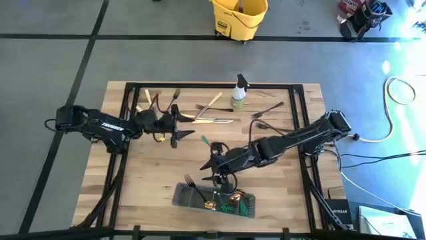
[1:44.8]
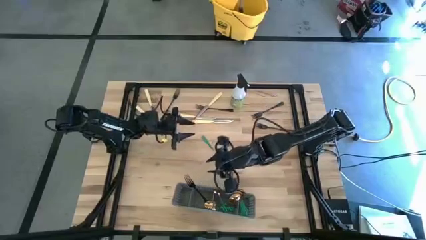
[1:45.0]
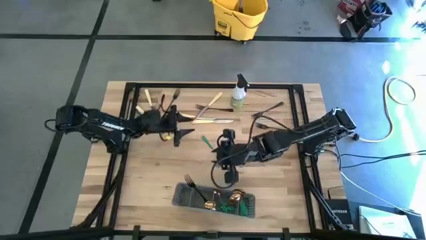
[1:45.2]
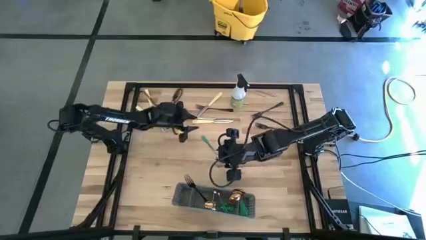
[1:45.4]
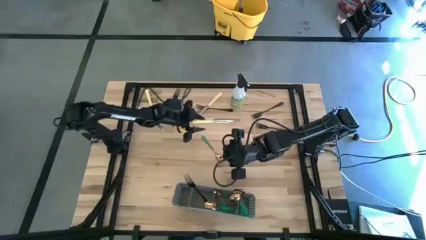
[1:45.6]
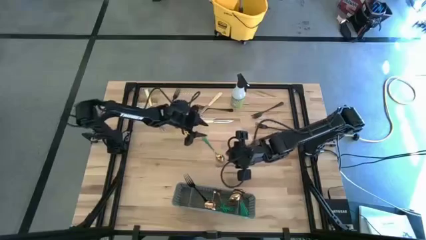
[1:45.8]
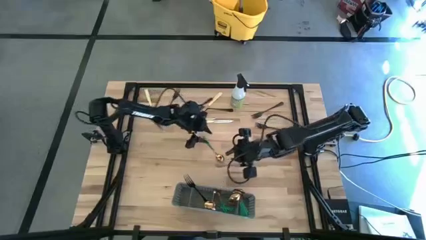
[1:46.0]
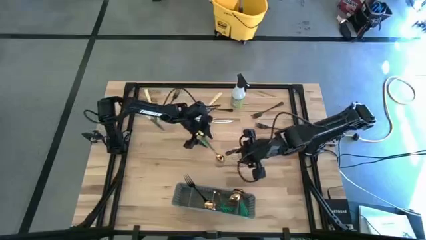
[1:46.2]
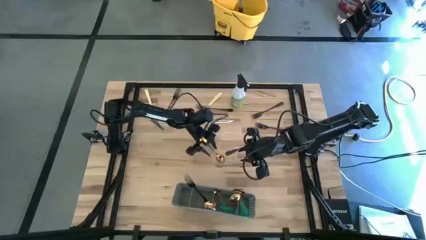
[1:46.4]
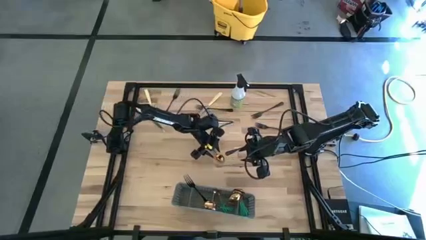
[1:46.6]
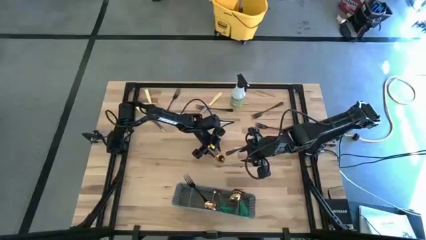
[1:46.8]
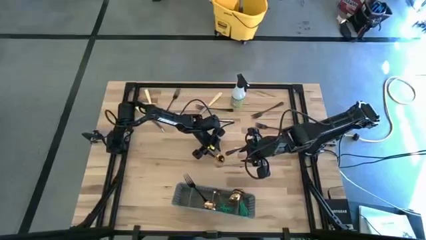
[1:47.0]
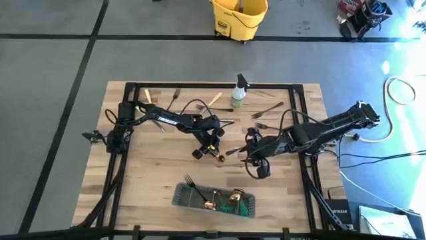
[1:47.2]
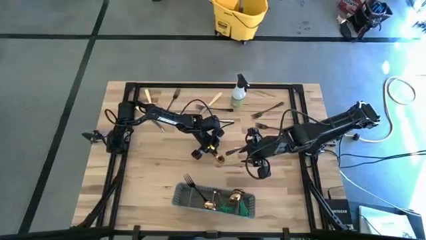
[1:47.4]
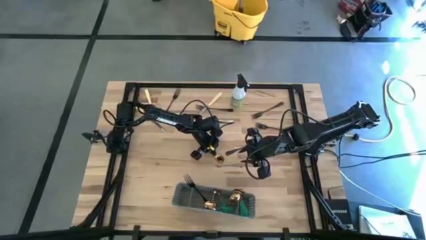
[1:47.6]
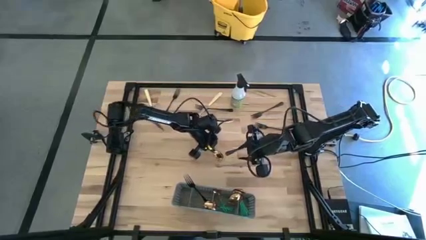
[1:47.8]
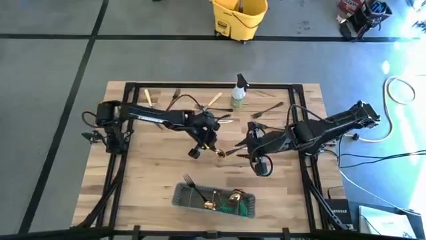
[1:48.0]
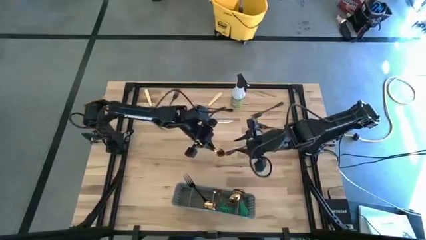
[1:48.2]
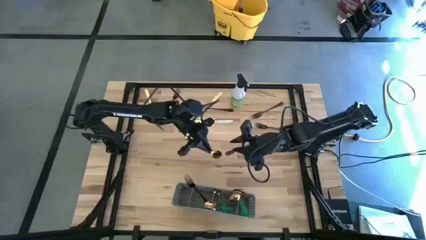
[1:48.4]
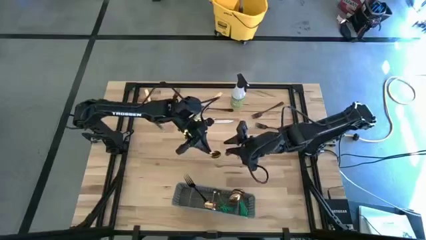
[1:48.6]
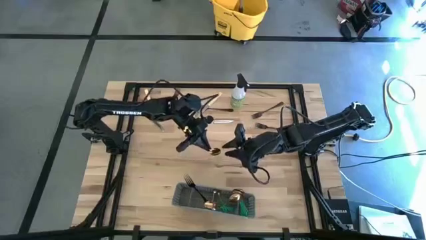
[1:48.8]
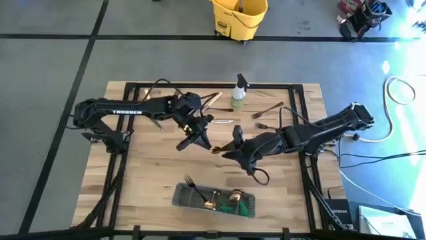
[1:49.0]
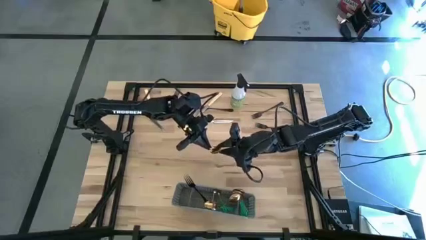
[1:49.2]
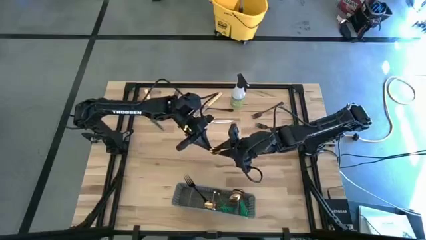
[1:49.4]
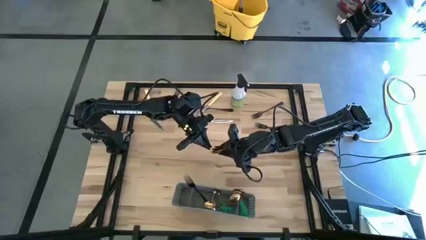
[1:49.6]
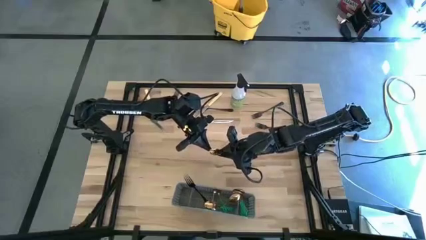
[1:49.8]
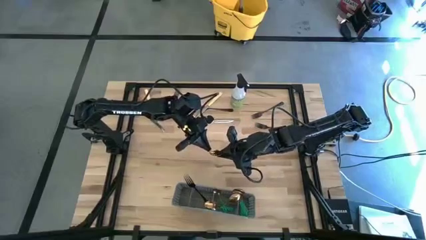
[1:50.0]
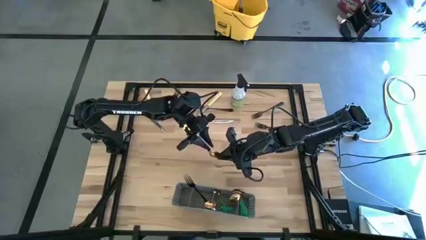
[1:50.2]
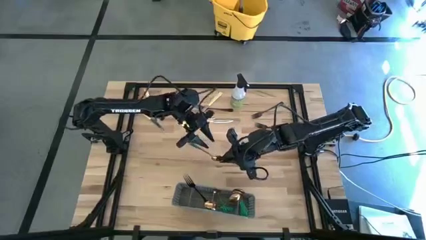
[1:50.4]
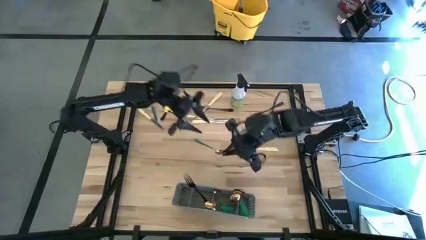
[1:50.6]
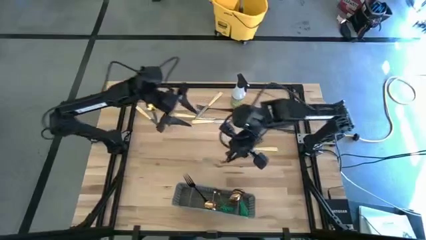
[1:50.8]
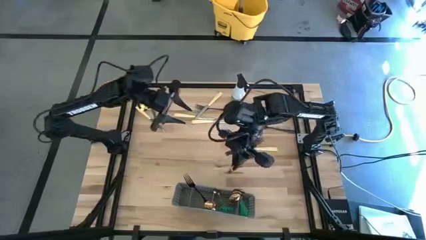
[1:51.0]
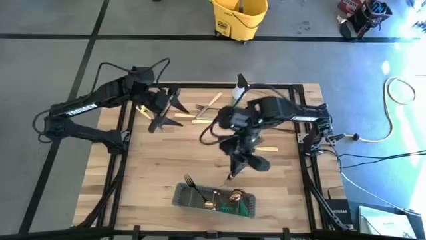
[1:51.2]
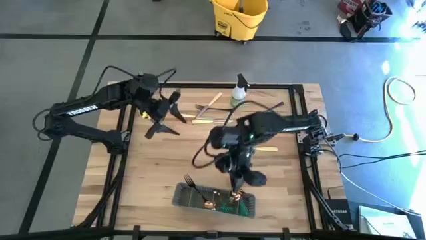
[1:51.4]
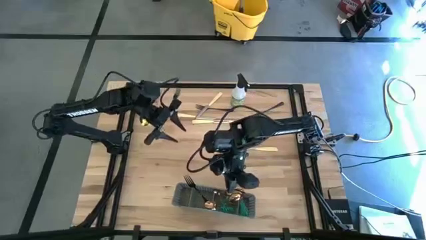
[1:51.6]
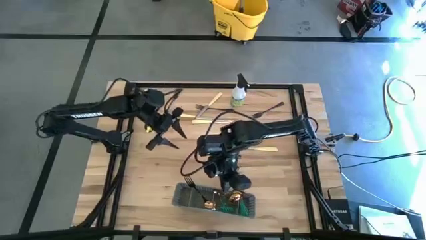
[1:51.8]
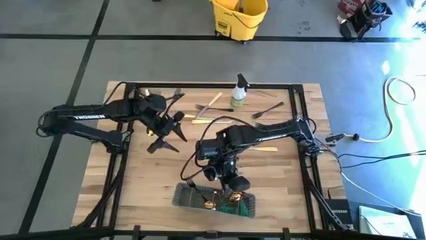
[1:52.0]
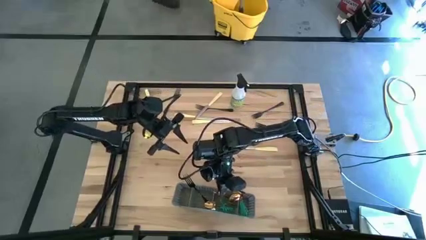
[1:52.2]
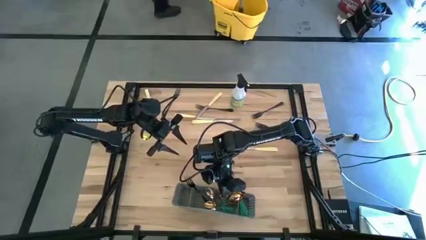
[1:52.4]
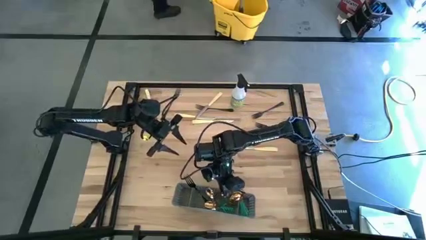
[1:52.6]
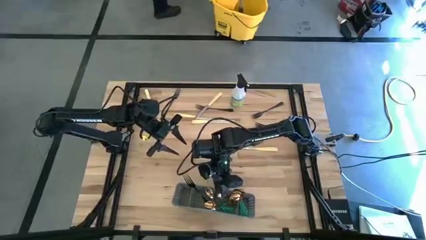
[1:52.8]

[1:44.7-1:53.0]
Task: Sort silverware
Put the green spoon into the gray cutlery rack

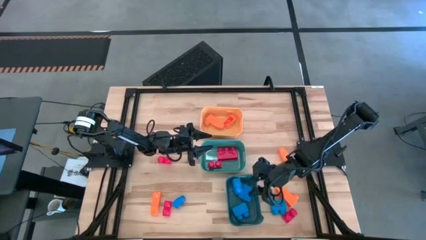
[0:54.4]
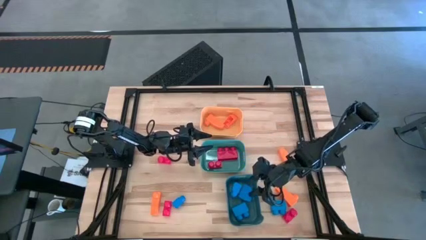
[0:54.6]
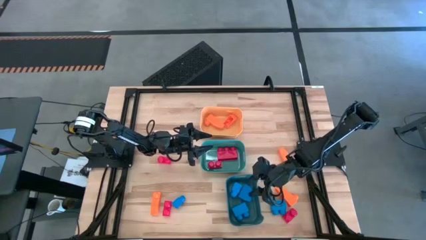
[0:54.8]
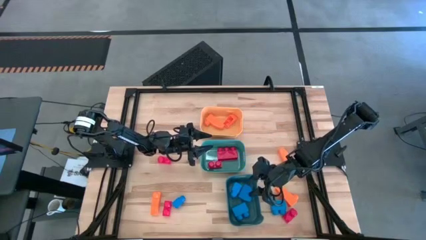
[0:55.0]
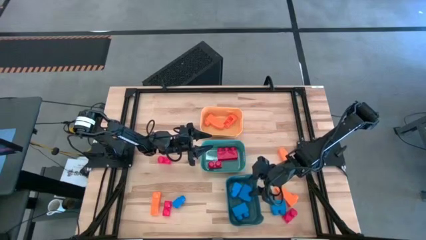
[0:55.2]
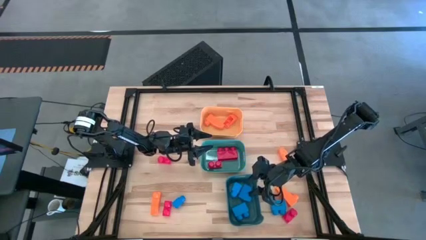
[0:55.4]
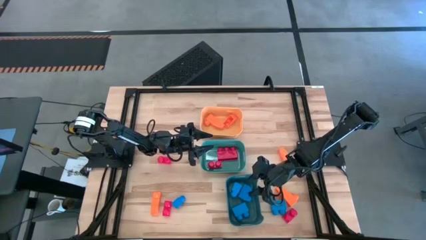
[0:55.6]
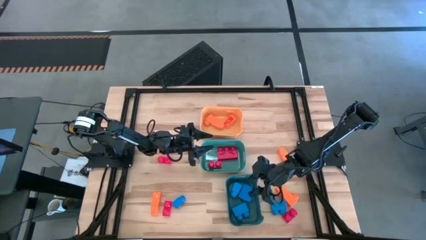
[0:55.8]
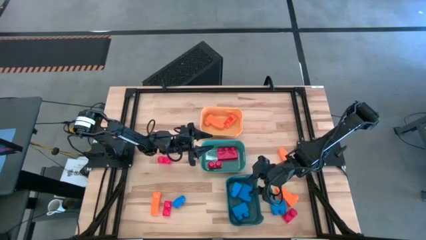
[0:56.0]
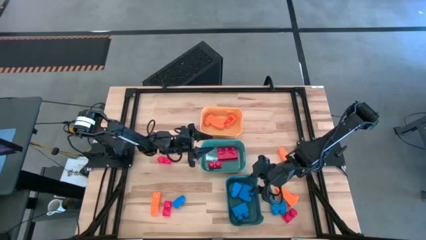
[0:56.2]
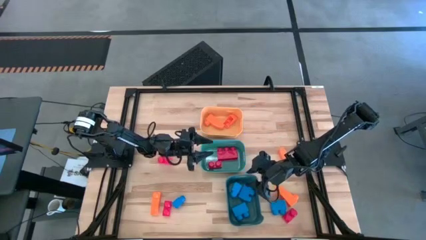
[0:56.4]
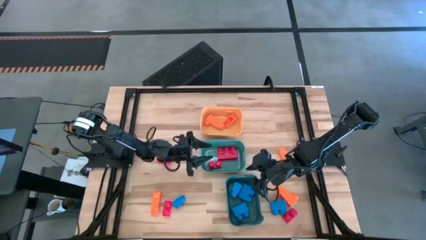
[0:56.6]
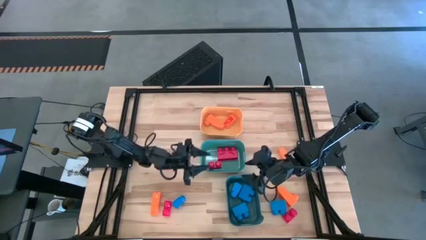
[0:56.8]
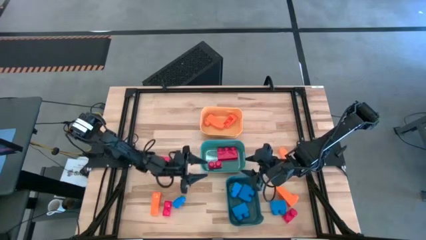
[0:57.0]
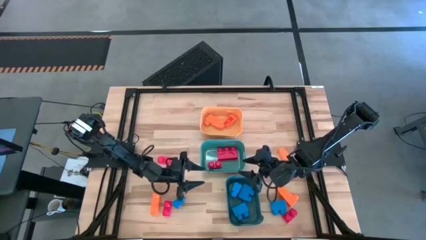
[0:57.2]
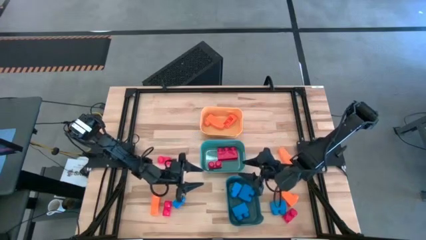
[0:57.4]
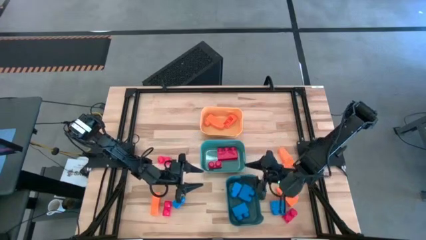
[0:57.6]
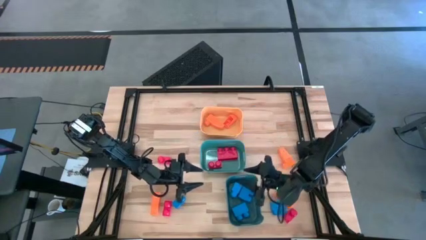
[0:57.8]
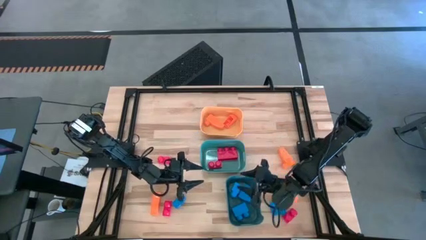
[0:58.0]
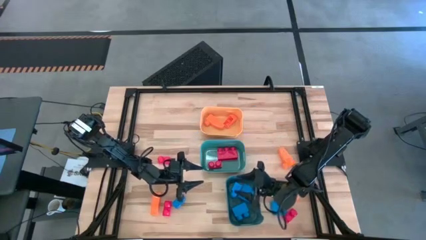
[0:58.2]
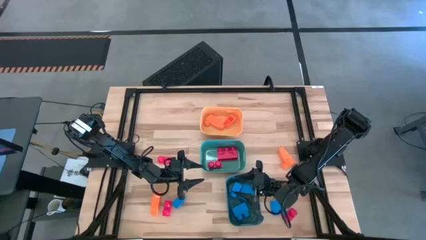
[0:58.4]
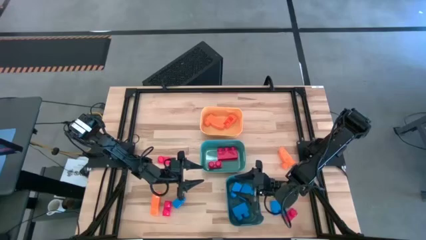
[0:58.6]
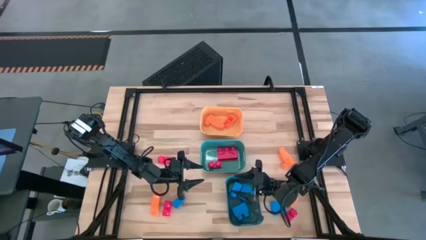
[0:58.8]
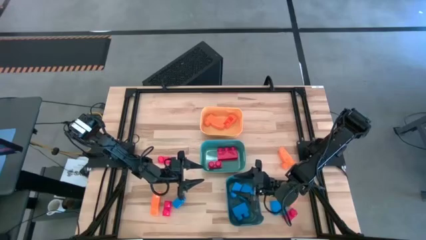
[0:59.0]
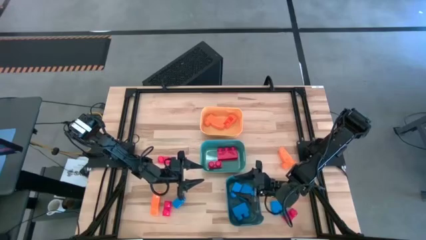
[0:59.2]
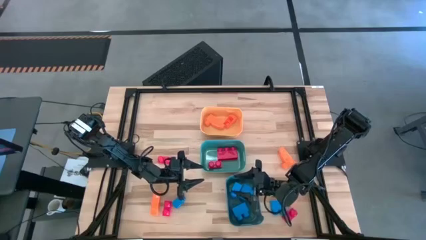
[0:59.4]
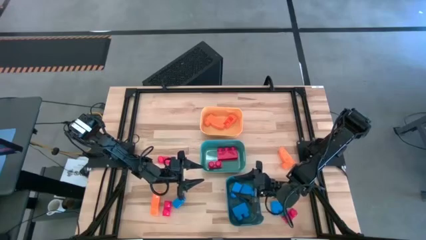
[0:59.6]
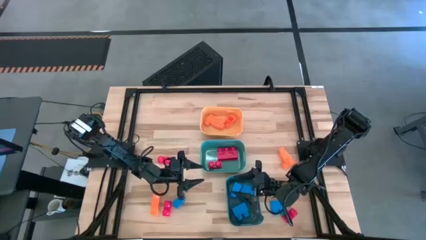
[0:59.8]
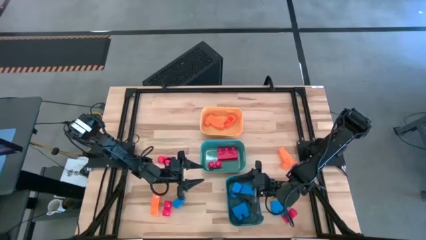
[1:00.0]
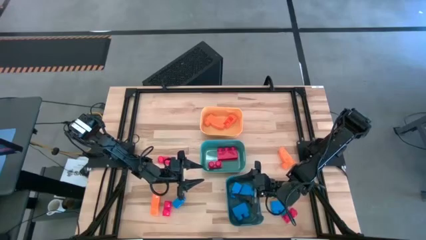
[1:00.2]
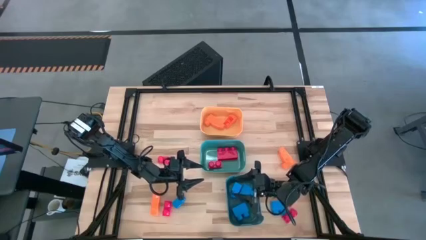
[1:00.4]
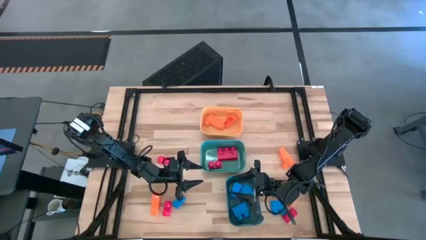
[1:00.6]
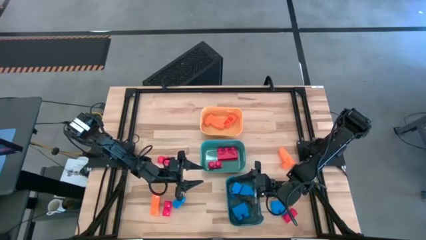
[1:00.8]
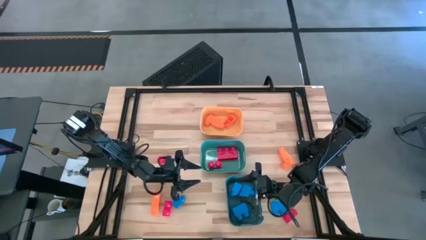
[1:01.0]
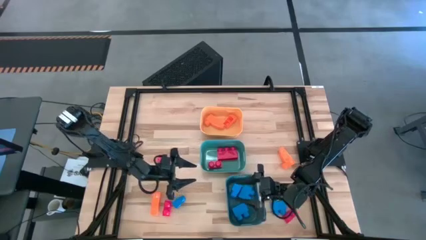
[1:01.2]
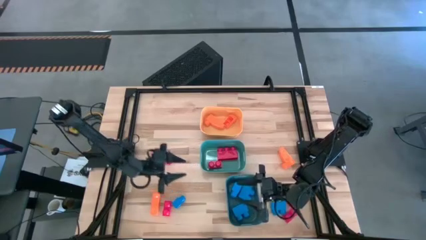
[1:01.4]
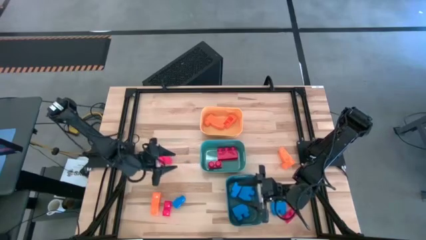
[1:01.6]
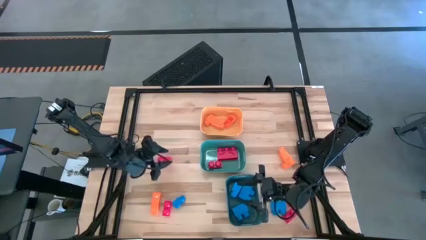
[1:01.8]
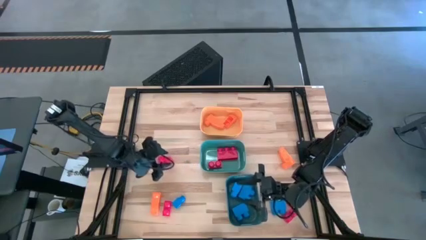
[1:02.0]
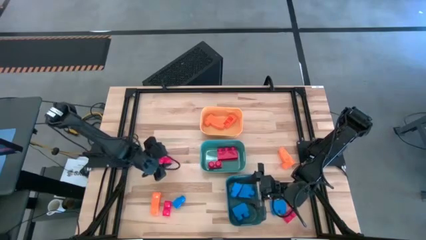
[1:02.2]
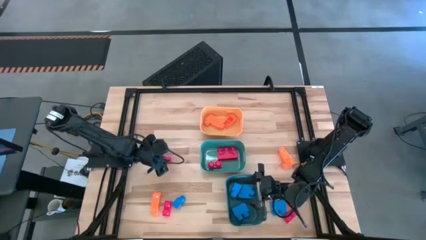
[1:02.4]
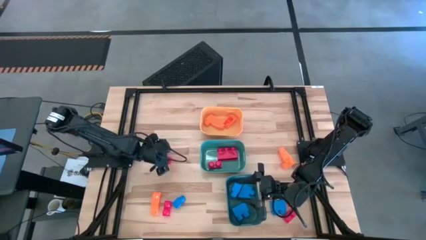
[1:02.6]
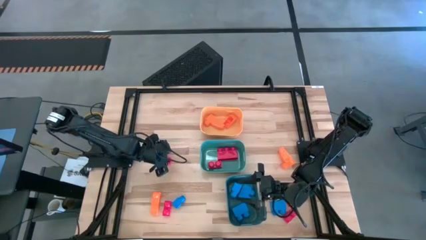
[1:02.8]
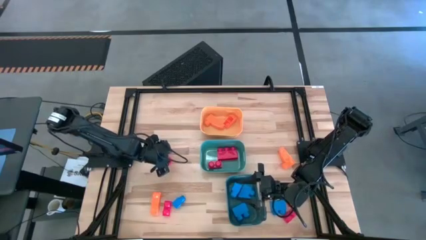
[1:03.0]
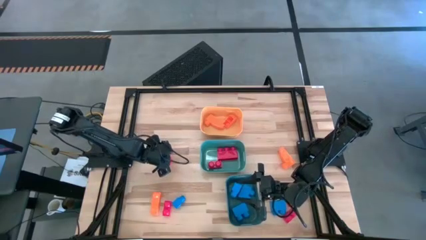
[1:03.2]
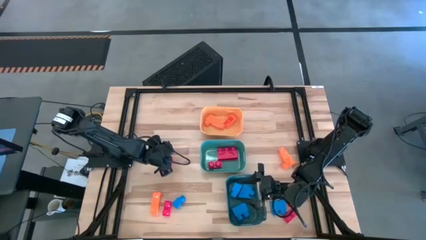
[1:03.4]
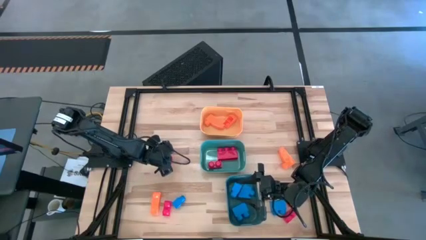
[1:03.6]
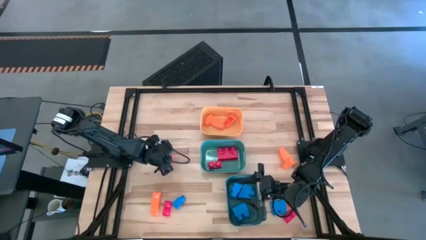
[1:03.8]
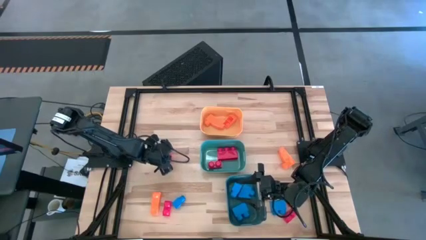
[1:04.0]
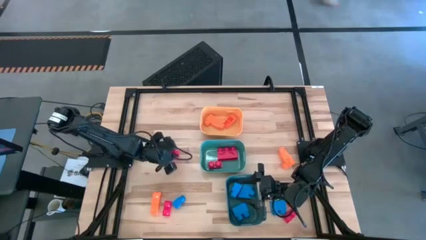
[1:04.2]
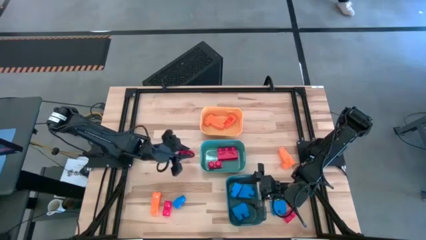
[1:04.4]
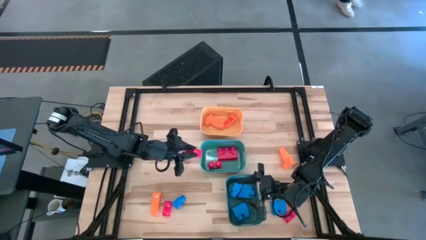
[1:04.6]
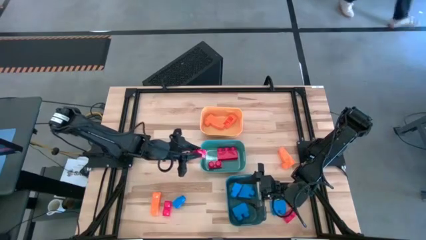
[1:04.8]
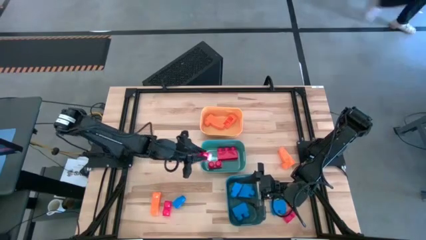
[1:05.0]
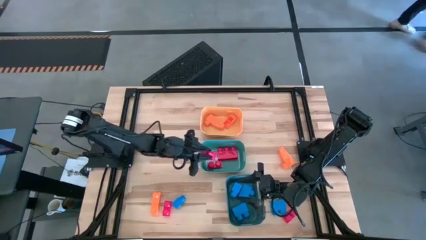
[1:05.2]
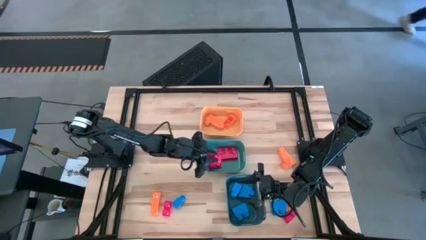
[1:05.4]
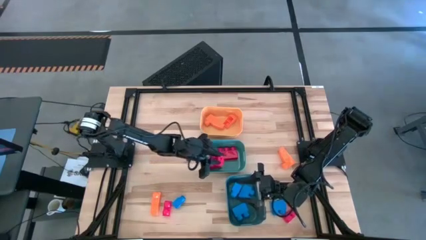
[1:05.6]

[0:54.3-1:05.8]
Task: Sort & place blocks by color
Put the red game piece into the green bin
